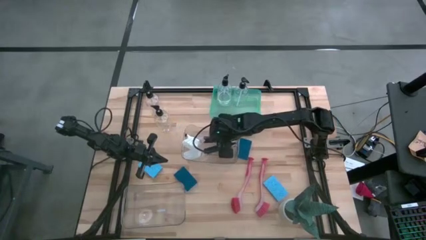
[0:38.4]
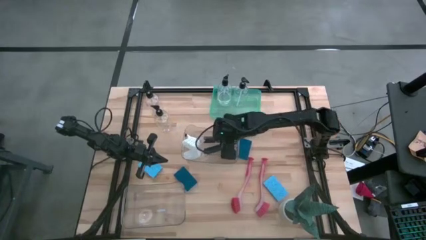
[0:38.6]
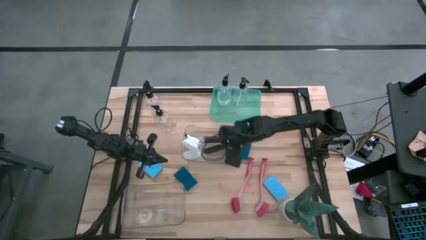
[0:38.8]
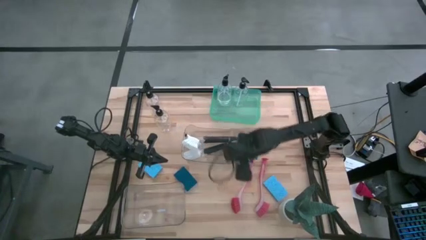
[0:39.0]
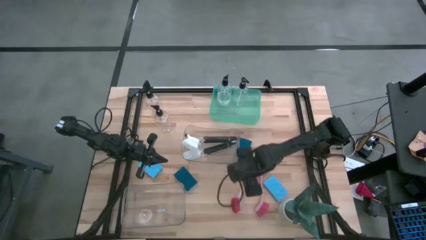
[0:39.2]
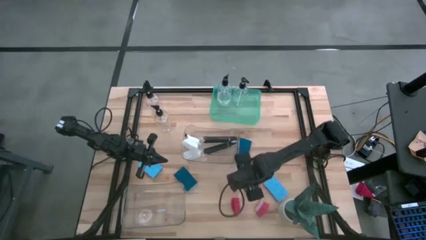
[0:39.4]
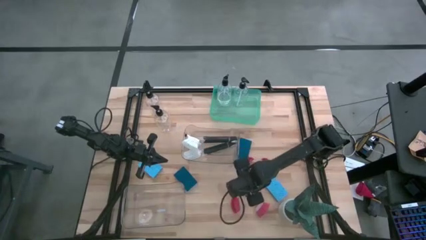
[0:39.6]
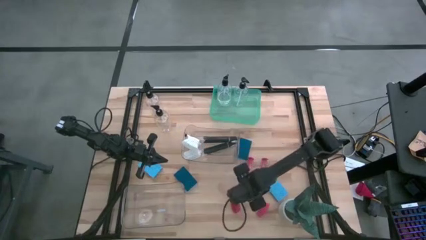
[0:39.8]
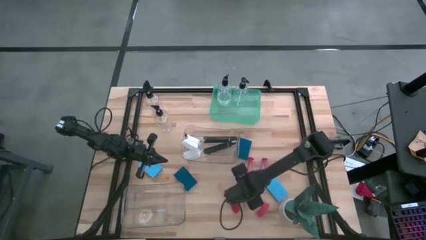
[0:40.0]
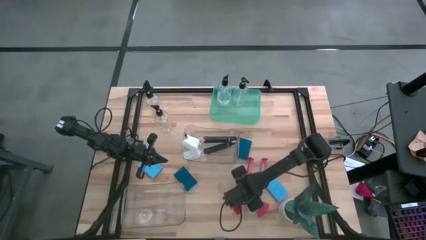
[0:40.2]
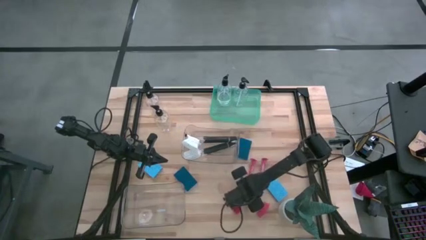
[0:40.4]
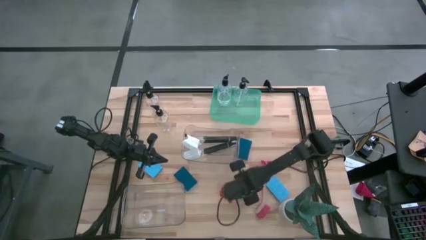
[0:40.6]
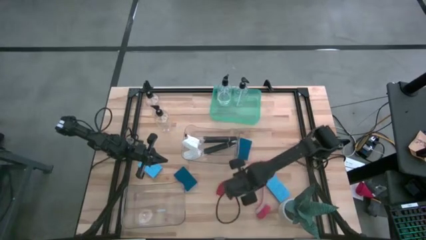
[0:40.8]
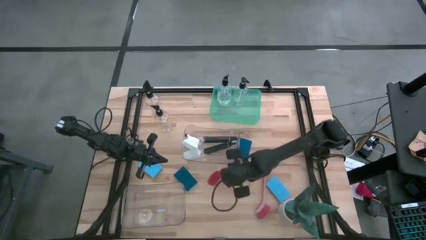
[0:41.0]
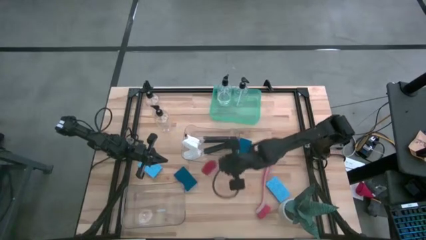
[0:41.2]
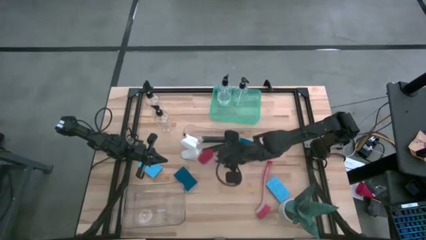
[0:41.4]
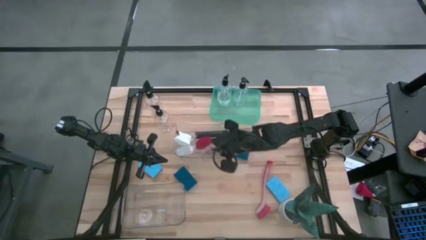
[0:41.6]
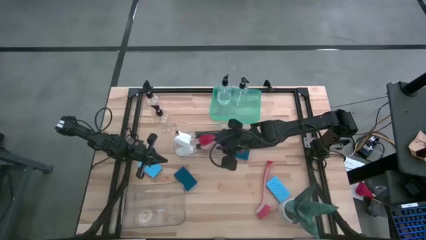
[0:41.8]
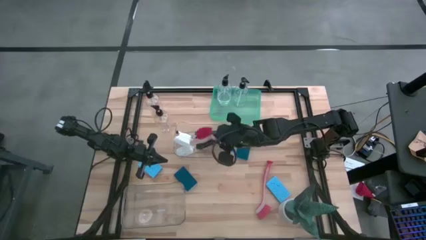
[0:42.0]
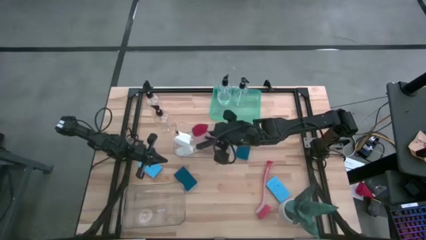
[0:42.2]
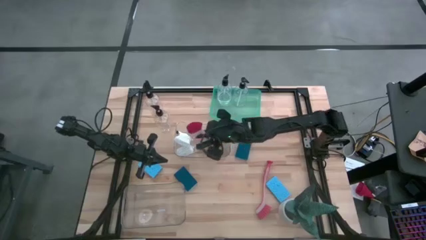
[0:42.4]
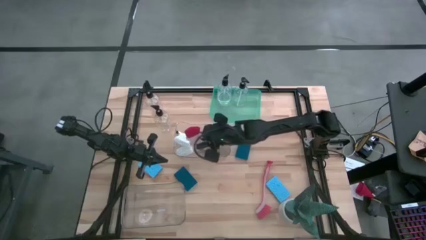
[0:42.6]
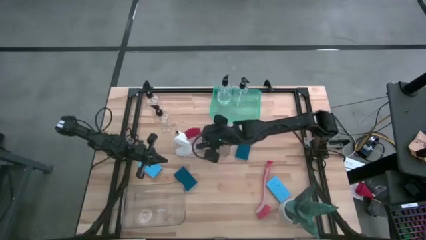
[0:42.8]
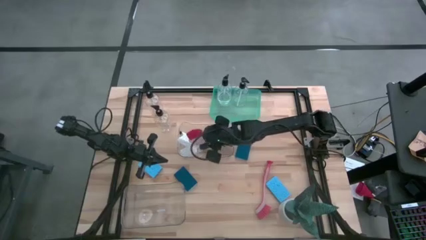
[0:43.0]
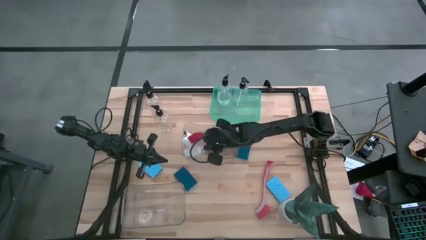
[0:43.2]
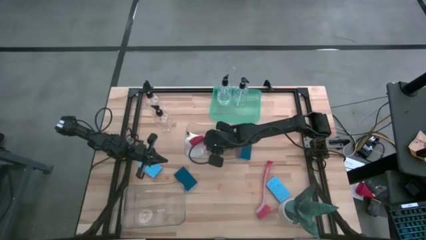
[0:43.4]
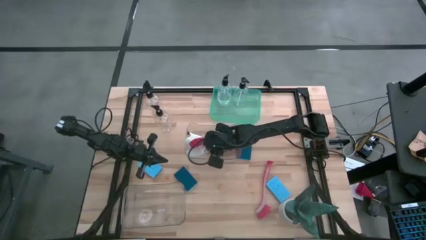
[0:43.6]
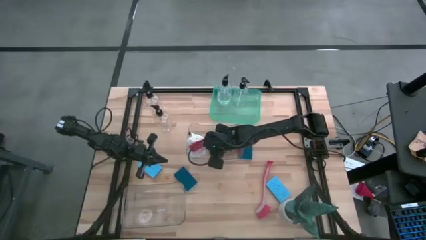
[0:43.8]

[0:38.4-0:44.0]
Task: Pick & Place Kitchen Sink Supplies
Put the pink dish brush into the top transparent bin

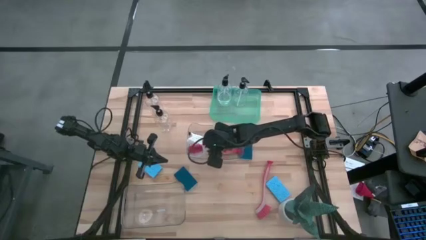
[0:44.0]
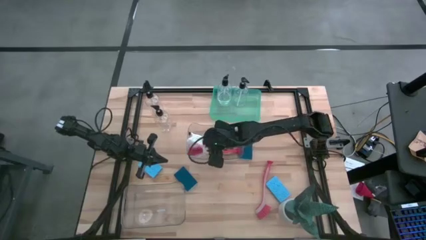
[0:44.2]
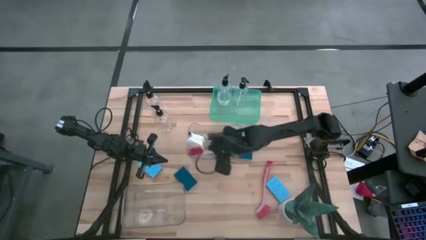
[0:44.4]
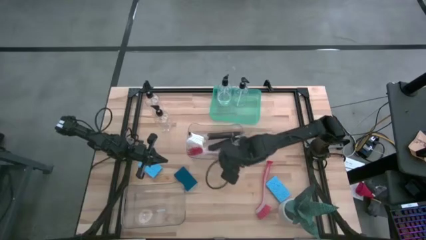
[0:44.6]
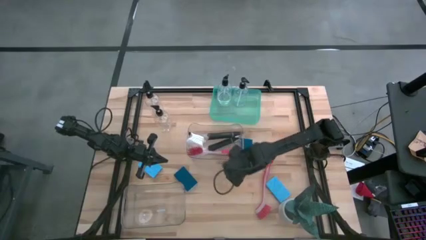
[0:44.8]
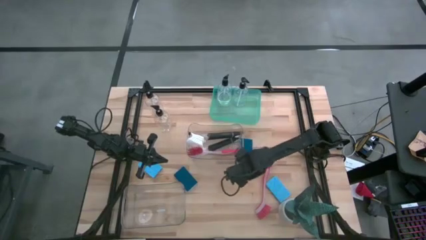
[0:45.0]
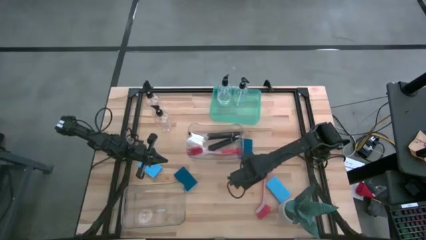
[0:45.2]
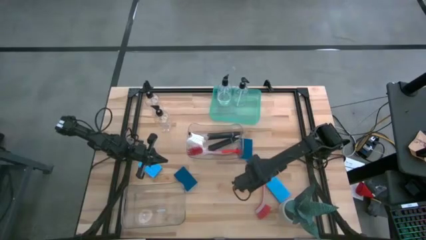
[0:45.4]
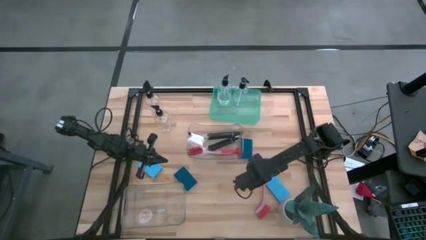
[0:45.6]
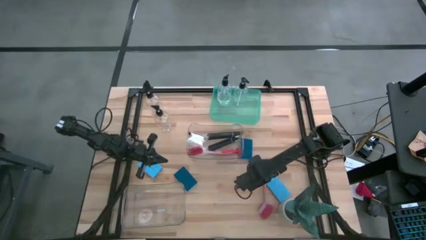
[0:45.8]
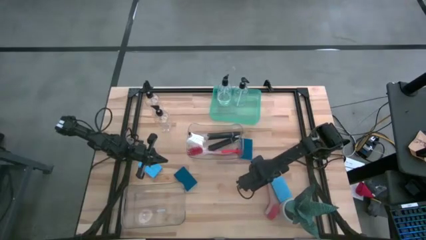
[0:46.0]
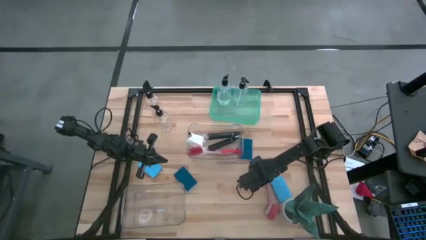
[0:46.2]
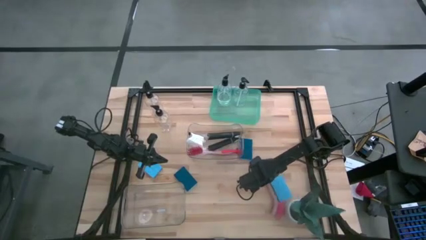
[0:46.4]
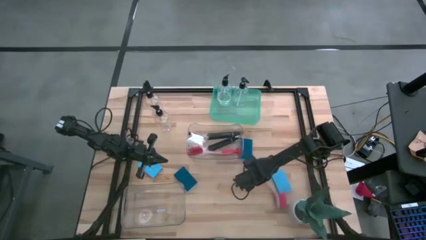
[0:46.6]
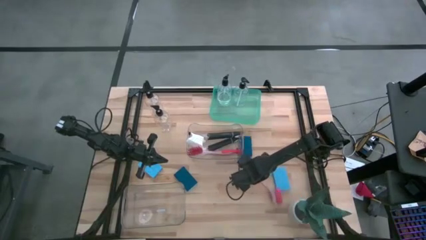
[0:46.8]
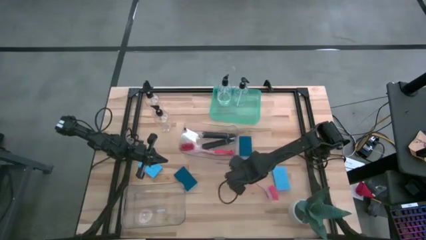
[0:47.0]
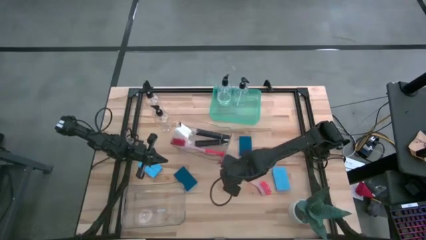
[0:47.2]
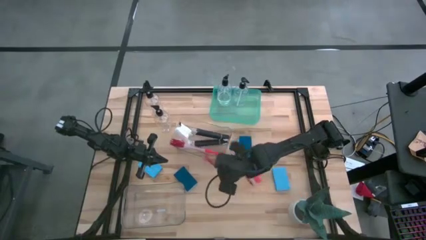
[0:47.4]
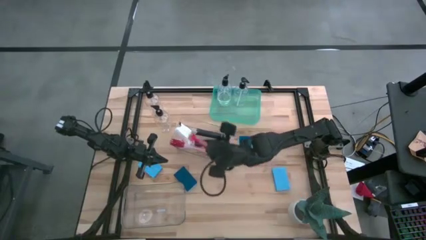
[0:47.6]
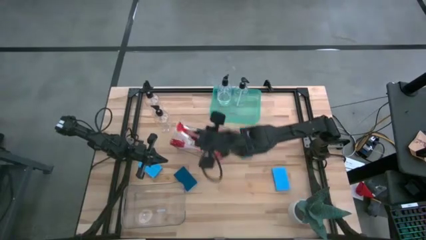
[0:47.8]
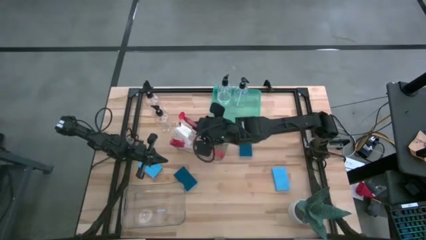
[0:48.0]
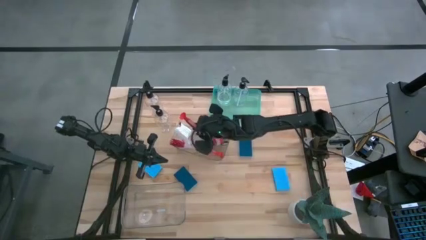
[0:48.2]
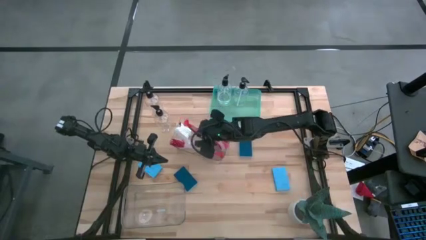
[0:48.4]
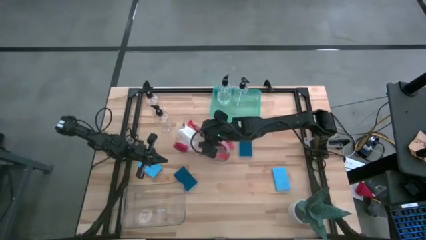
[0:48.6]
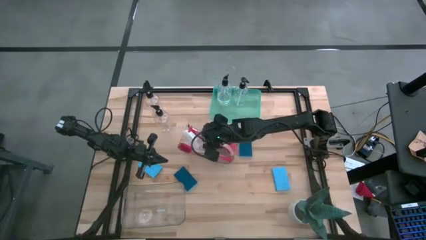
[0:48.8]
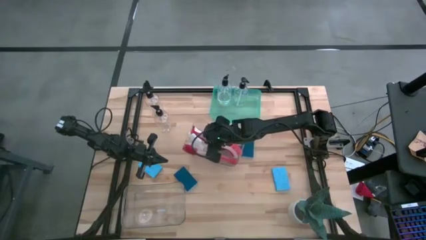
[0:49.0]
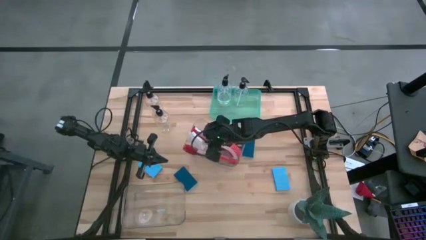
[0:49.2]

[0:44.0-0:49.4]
Put the pink dish brush into the top transparent bin

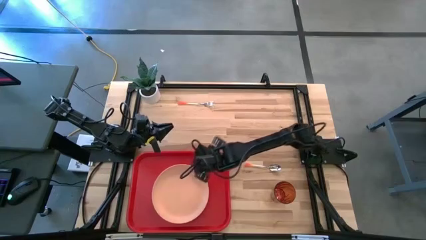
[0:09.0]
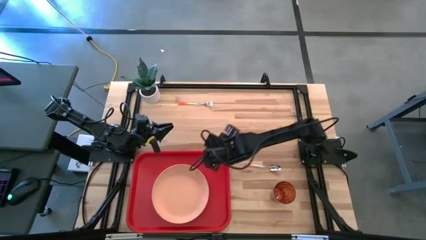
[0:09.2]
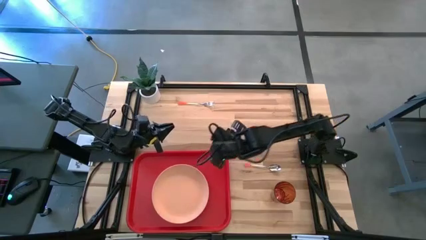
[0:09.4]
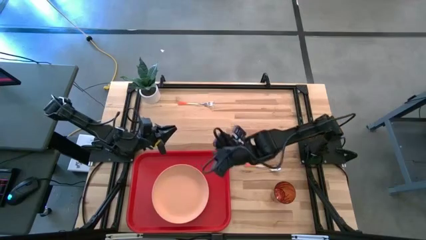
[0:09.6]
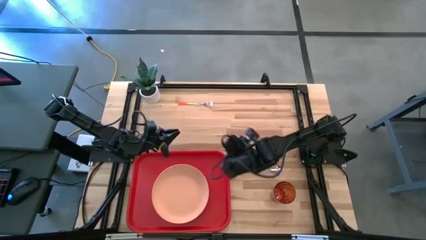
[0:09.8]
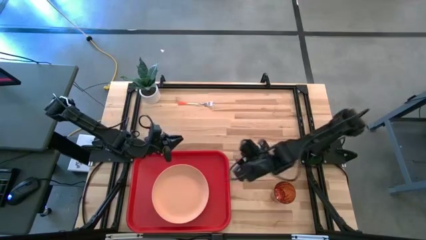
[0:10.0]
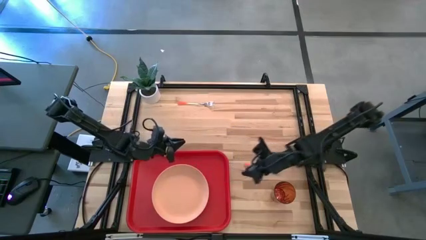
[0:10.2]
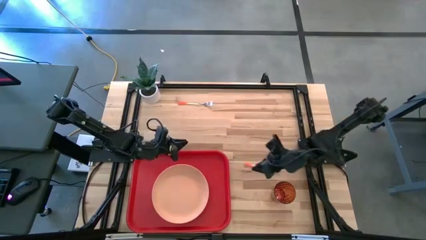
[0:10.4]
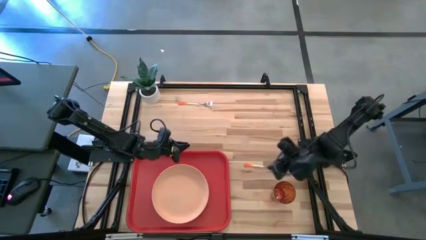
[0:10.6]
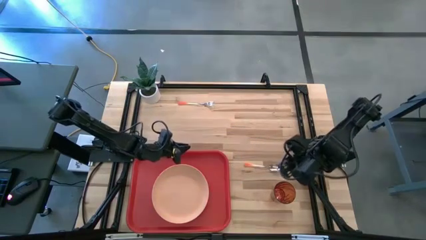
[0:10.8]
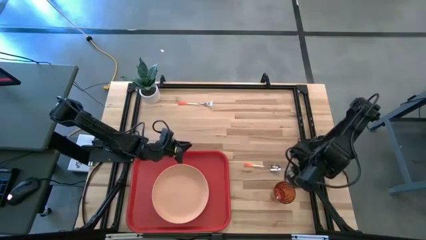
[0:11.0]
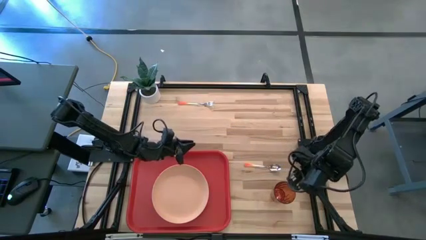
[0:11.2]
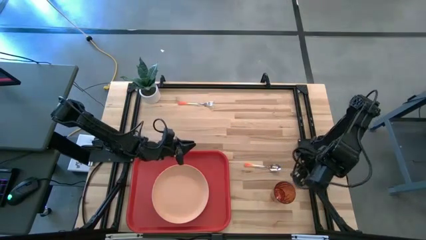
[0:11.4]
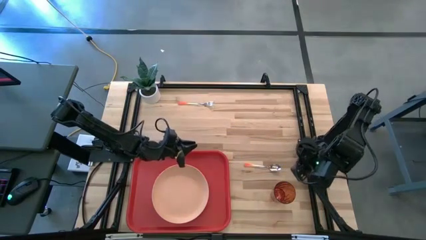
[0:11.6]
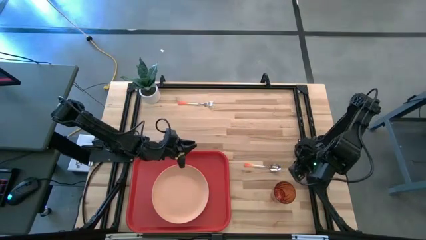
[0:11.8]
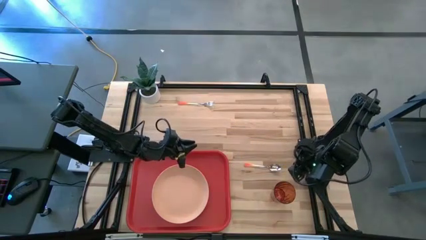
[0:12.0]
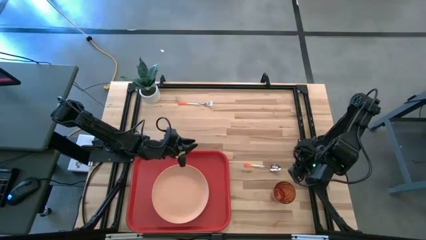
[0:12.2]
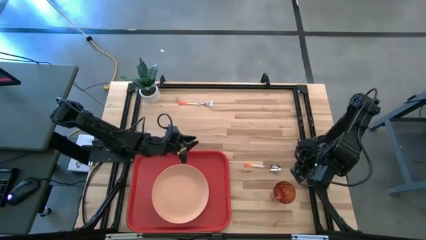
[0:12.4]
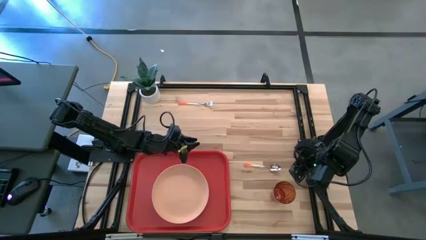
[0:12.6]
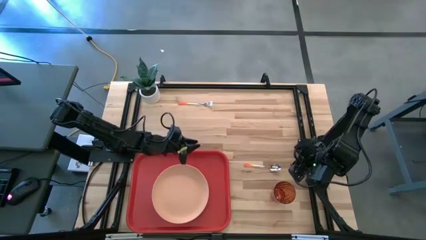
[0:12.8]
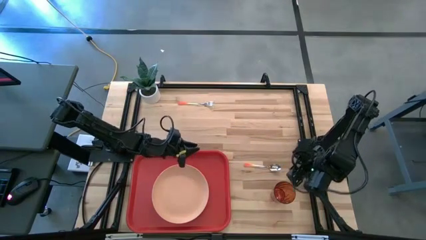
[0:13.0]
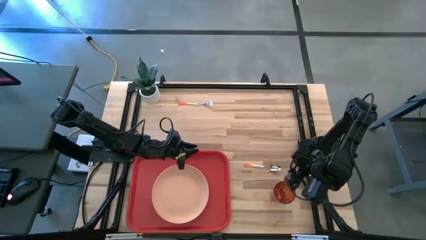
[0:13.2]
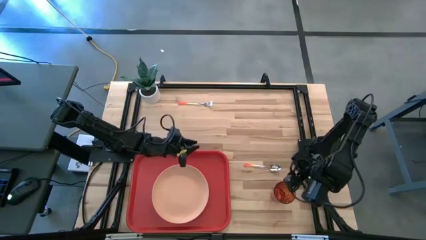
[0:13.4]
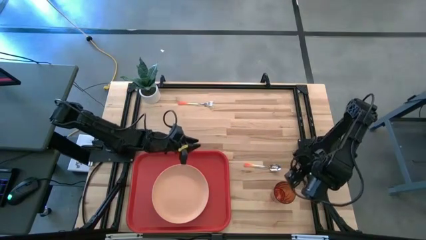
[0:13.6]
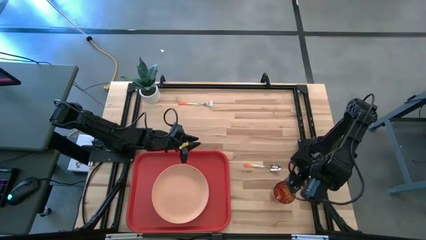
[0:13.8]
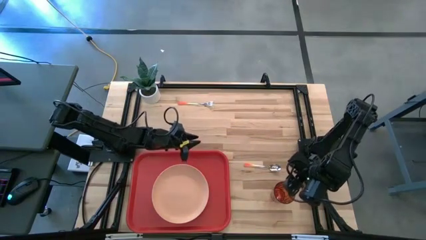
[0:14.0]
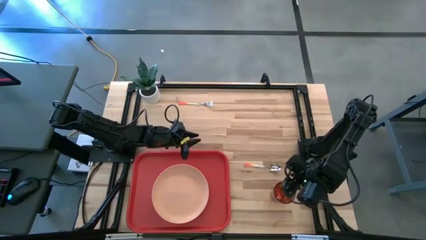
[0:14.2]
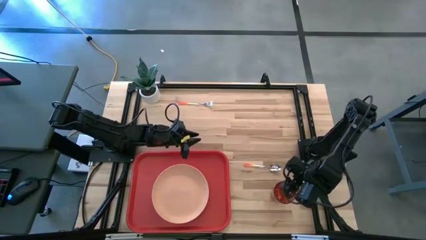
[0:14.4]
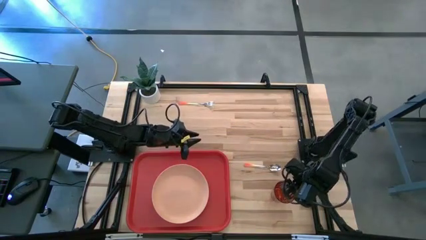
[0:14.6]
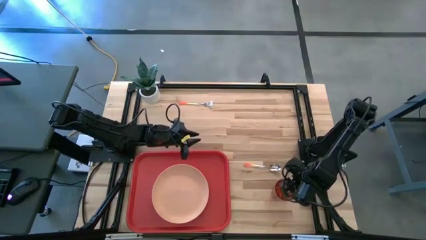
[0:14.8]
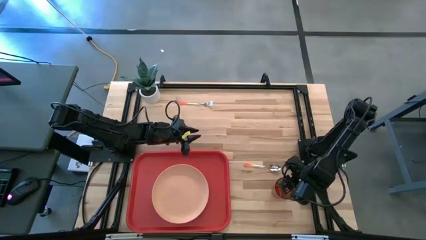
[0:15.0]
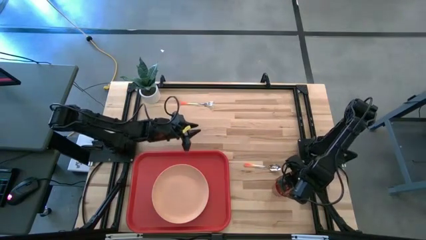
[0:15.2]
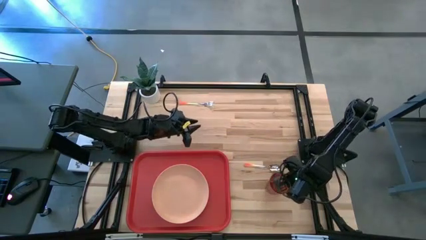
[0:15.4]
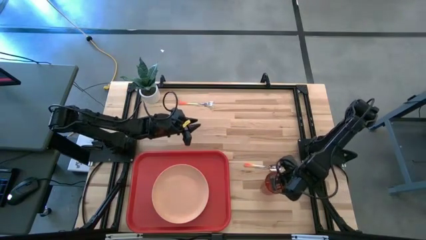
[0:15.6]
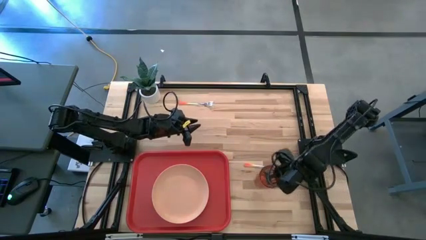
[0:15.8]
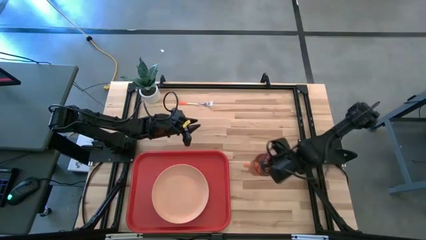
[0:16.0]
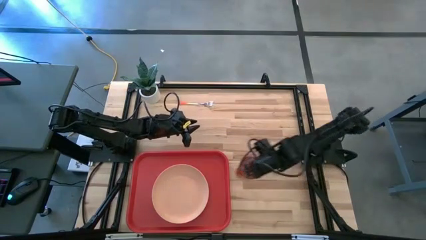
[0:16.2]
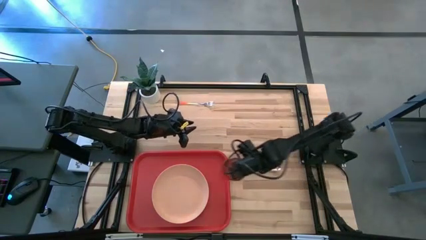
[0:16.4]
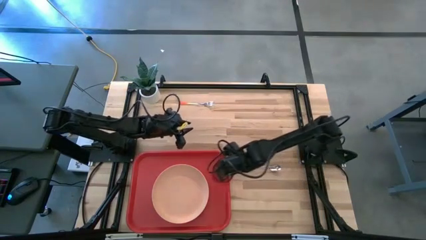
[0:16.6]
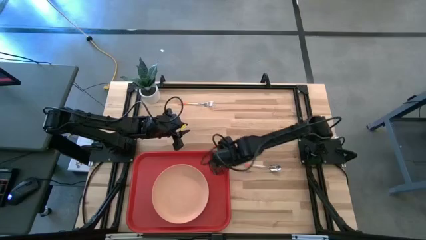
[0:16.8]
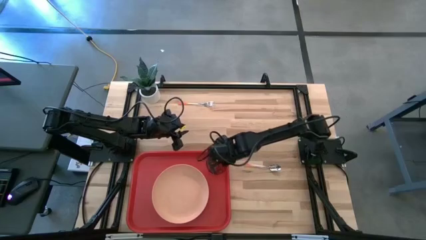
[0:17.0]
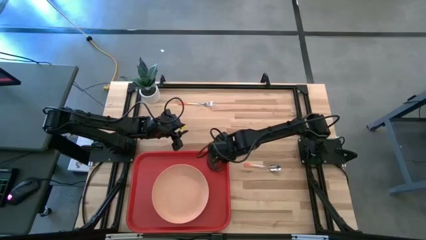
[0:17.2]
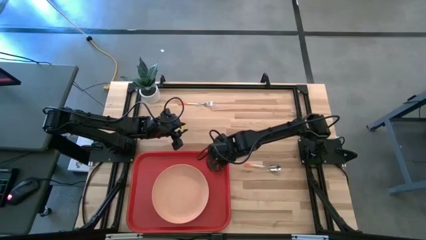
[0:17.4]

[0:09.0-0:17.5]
Task: Pick and place plate/cup/fork/spoon on tray
Put the brown cup on the top right of the red tray
